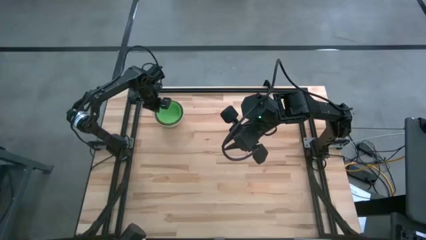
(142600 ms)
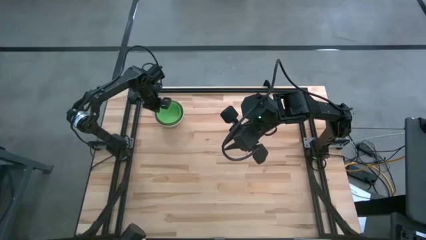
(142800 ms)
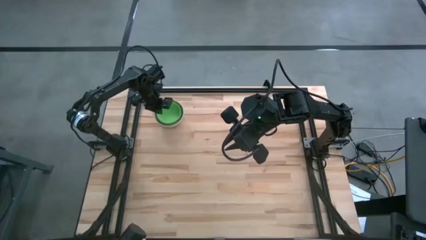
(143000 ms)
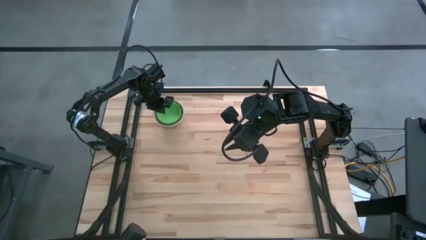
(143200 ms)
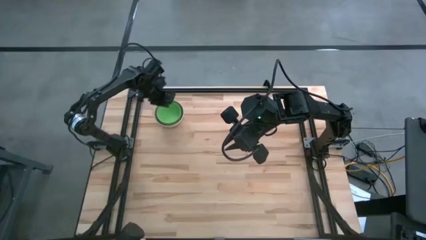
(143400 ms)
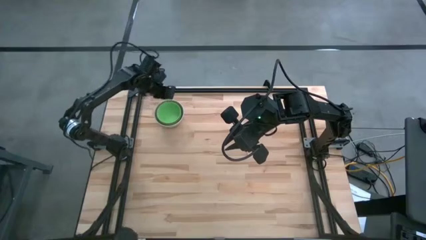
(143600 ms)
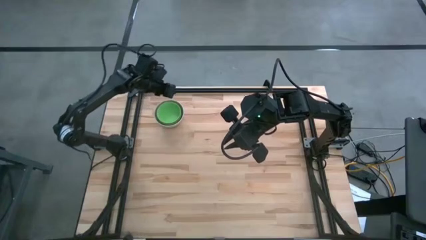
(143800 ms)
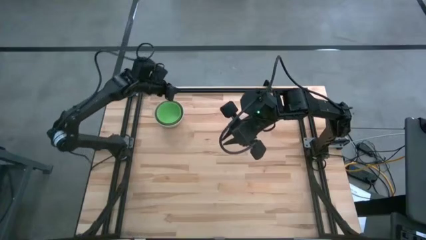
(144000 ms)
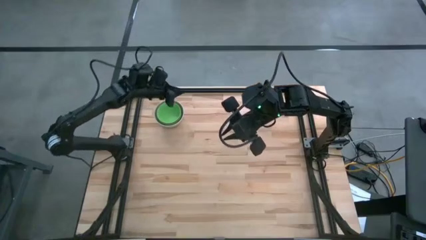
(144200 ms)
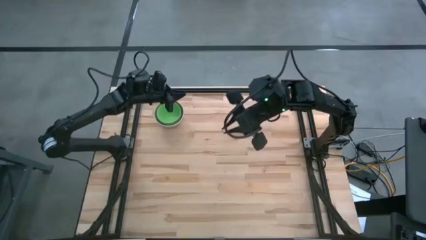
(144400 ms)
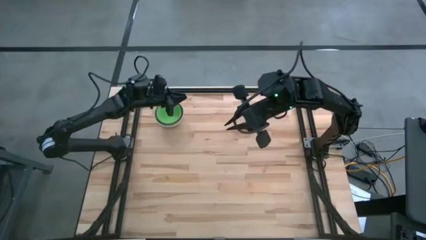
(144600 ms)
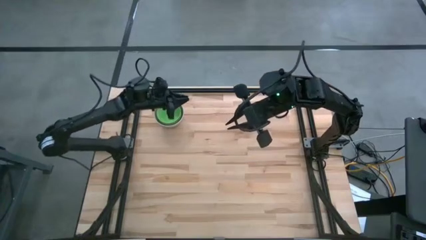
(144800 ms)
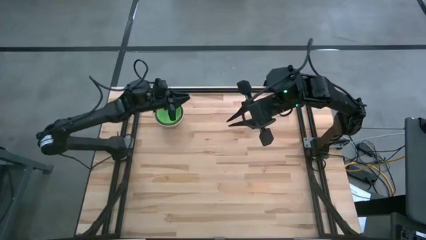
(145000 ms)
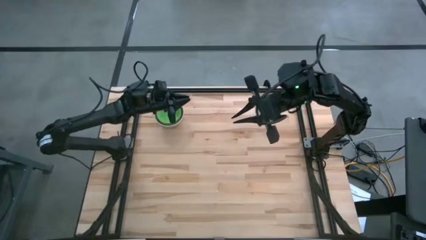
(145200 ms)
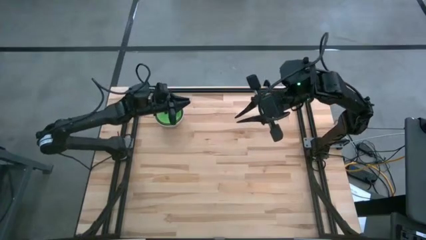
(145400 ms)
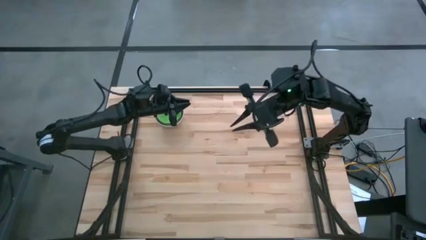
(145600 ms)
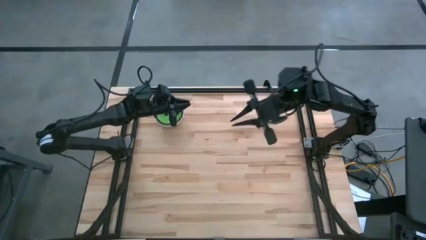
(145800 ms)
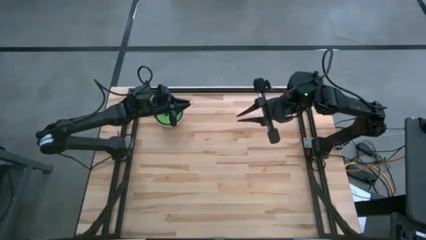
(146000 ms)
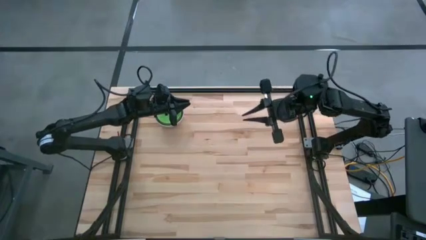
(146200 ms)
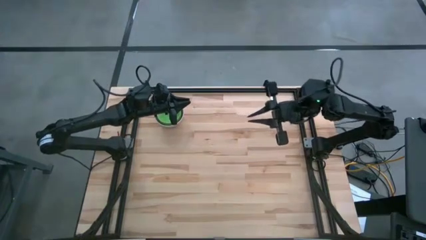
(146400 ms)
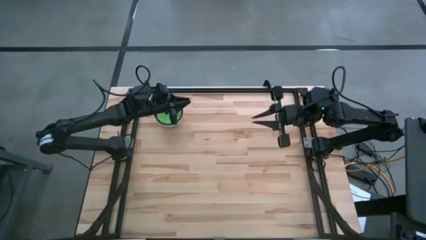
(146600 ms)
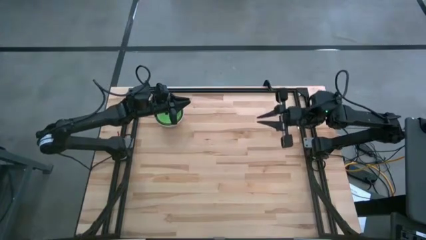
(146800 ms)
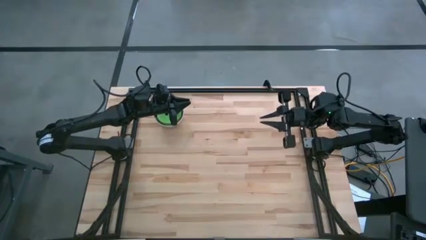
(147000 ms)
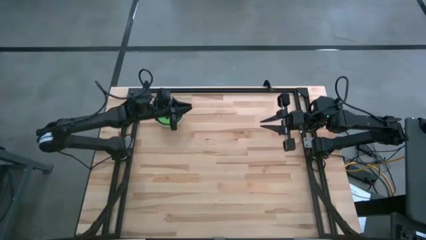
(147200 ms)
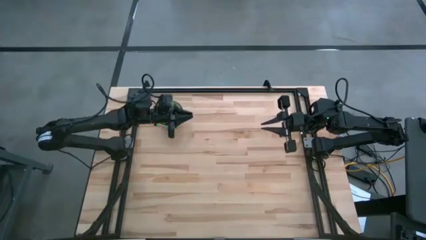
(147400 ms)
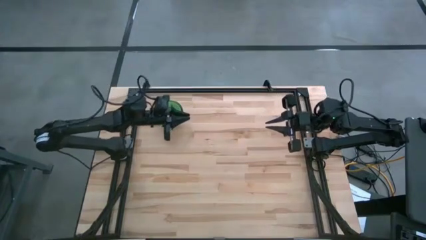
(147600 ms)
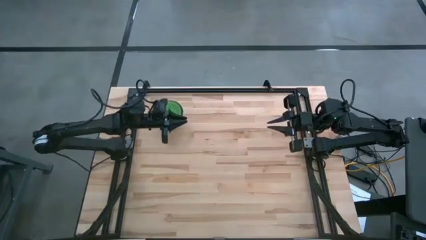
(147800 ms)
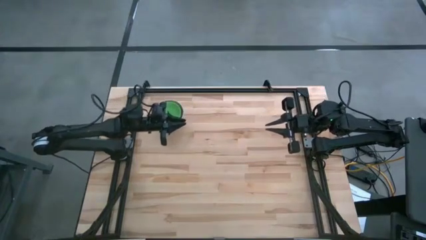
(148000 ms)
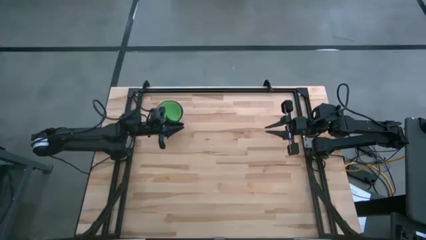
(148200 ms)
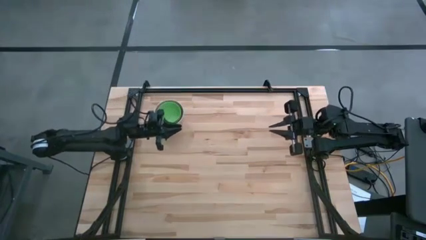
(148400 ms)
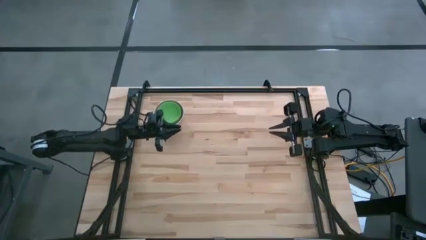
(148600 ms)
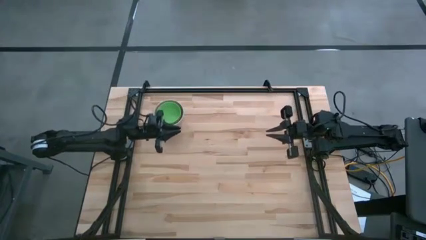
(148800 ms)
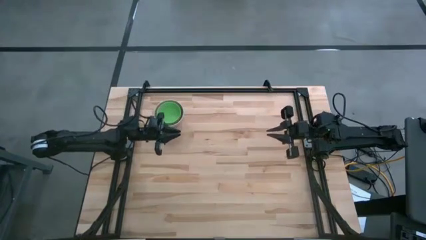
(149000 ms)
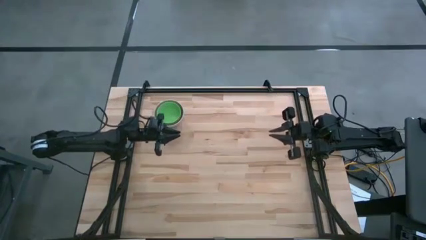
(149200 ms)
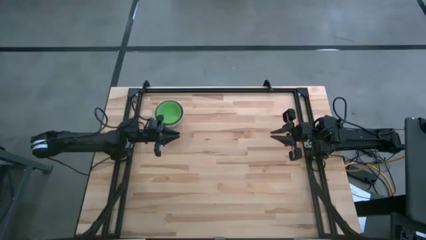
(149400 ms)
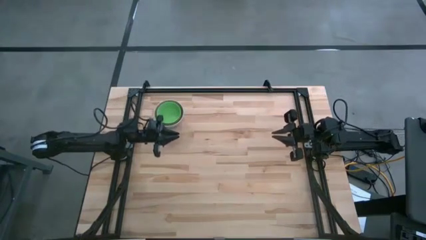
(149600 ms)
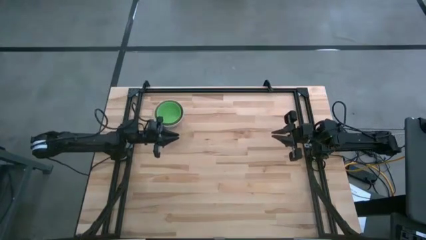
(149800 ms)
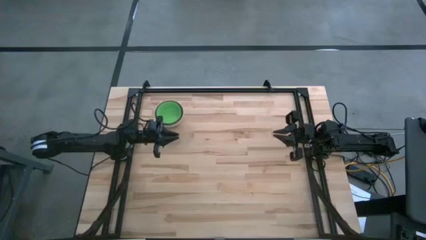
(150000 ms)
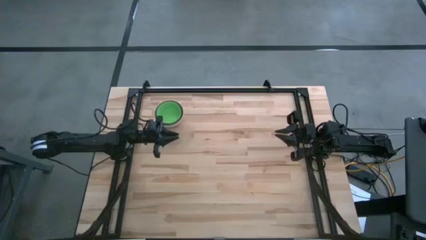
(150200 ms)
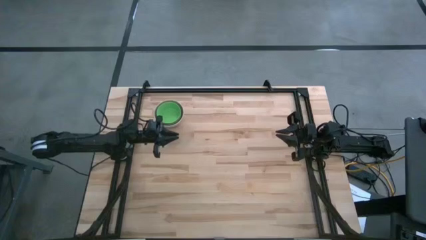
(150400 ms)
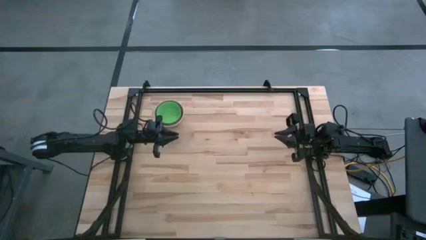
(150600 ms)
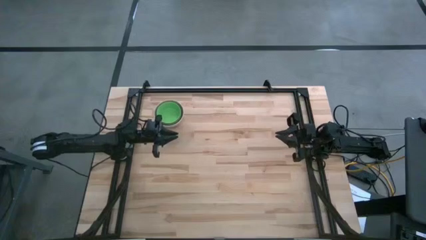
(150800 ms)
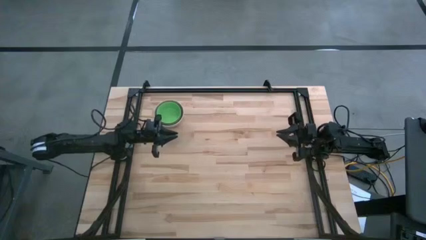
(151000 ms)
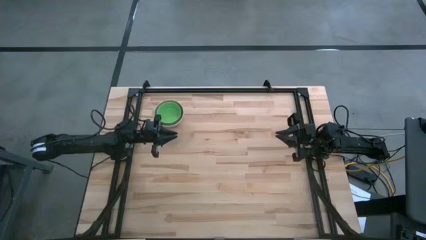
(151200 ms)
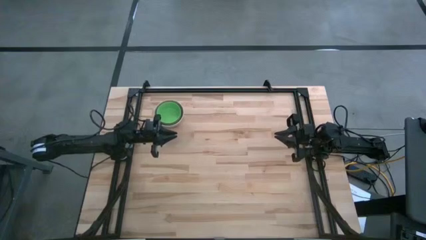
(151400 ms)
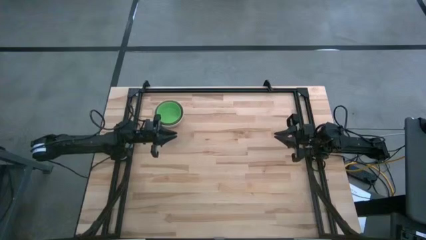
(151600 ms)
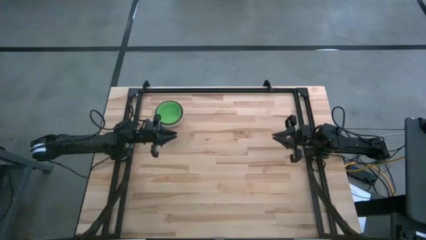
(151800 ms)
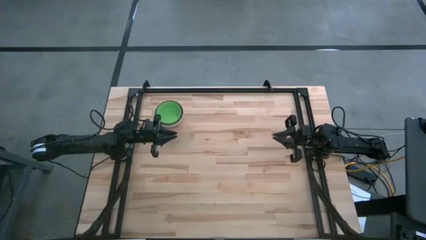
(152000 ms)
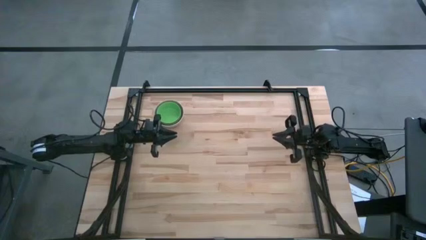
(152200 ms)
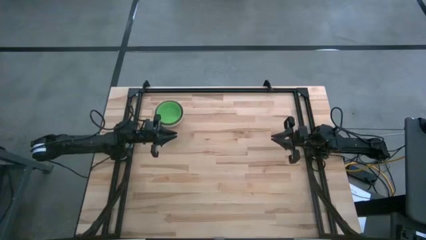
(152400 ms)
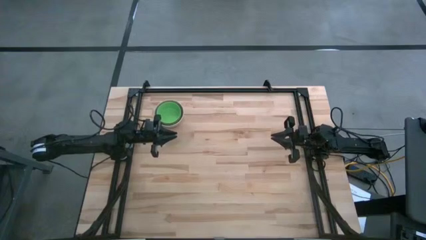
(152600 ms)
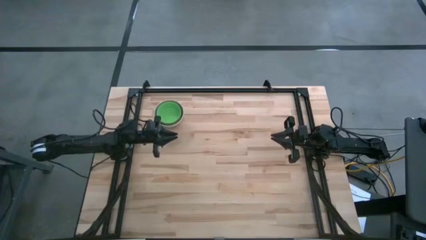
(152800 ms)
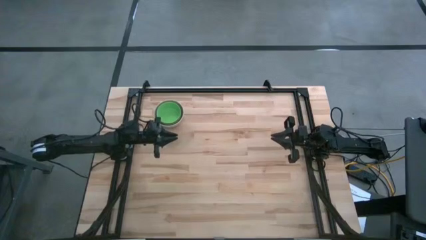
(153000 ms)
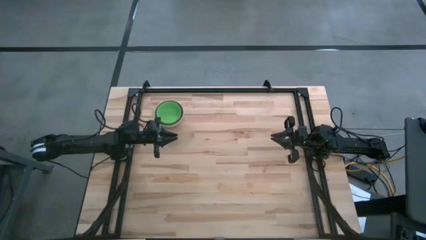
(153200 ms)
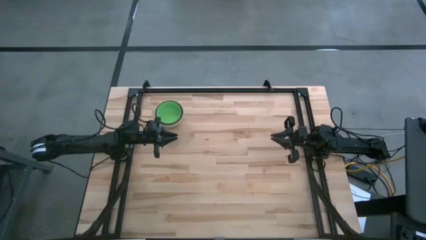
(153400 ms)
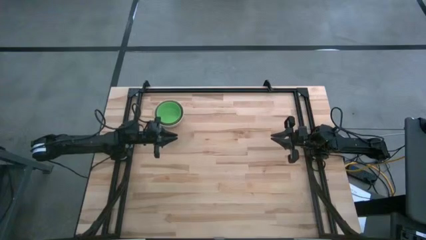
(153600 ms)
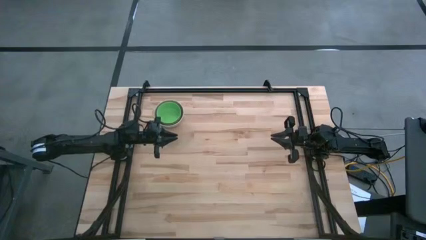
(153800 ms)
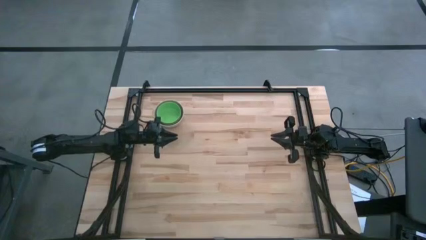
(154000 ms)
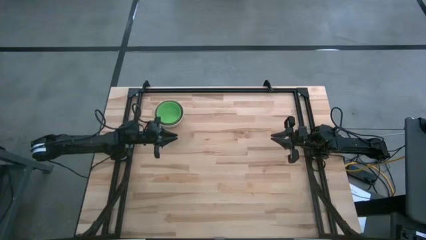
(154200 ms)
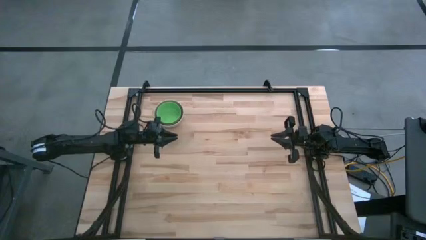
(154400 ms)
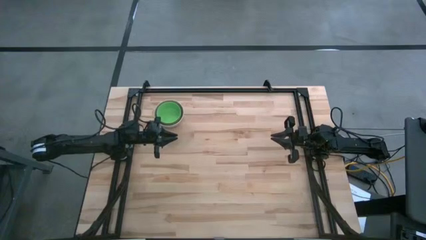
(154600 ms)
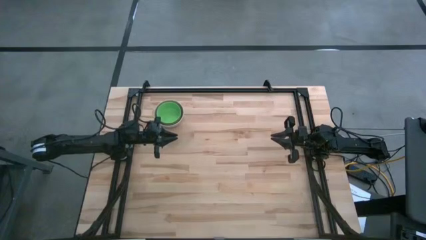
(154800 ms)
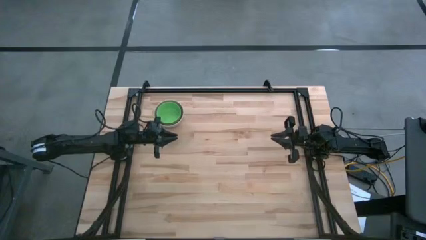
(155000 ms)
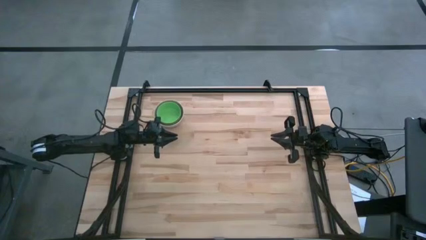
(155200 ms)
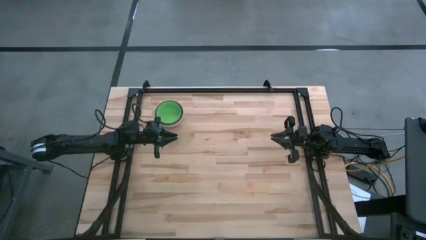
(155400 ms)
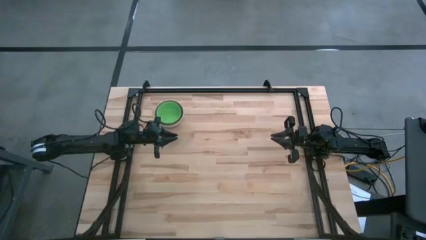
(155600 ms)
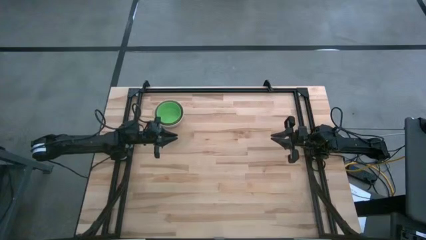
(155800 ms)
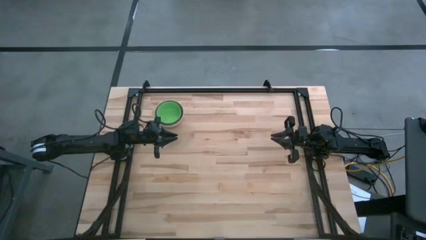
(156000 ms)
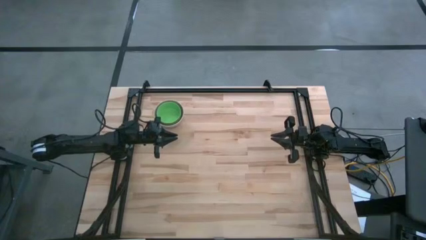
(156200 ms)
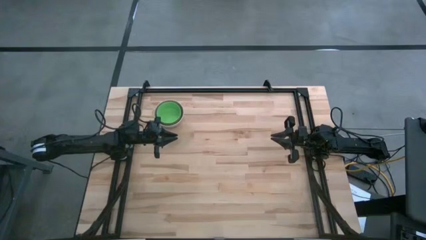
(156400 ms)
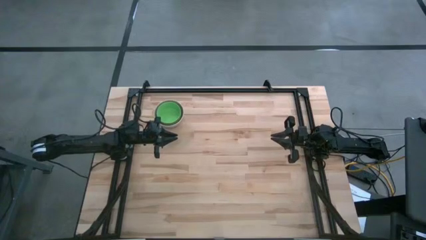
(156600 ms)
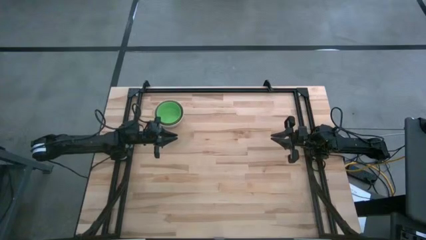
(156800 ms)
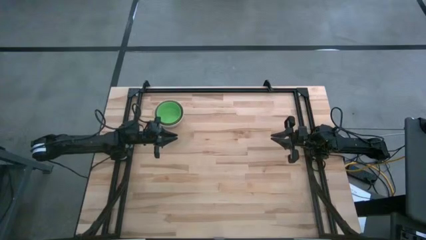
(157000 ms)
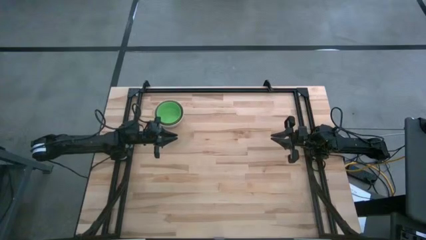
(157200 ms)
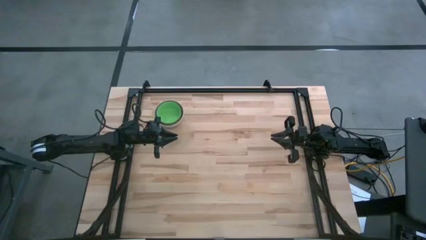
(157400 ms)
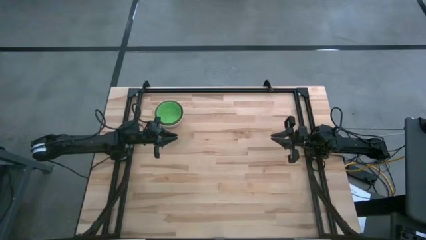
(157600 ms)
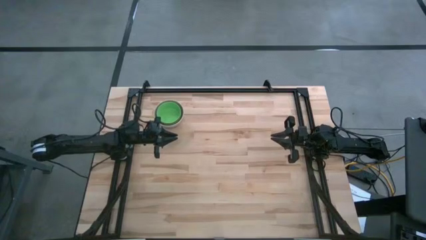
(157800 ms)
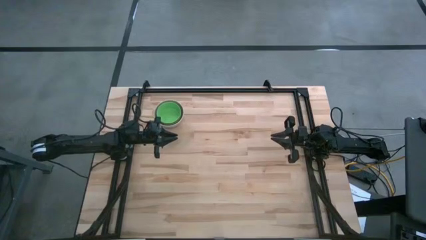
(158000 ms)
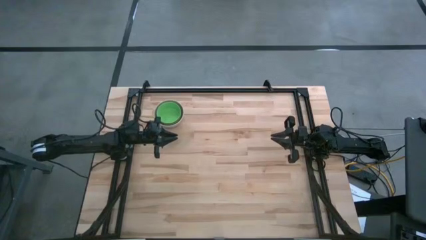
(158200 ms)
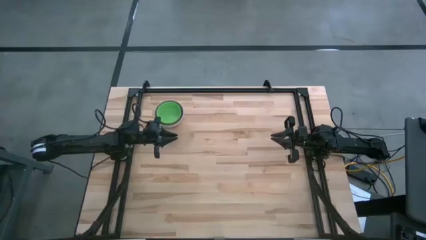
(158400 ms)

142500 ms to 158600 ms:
Return to Home Position
